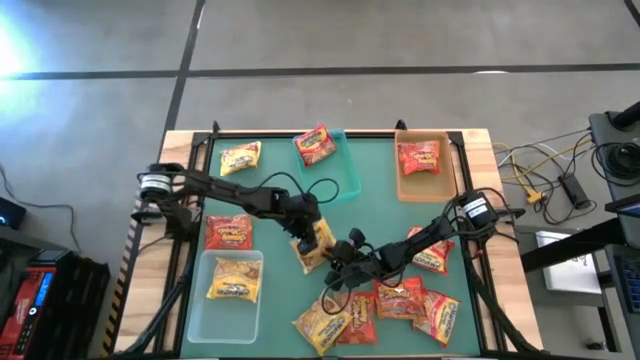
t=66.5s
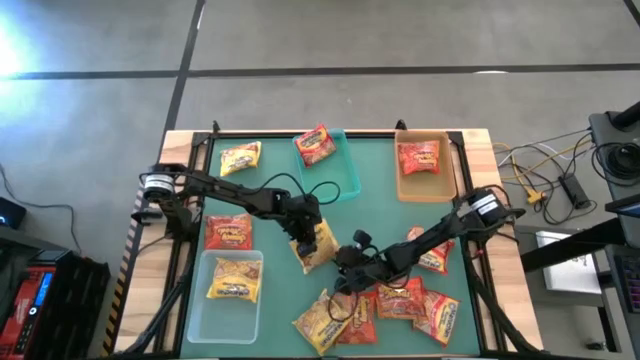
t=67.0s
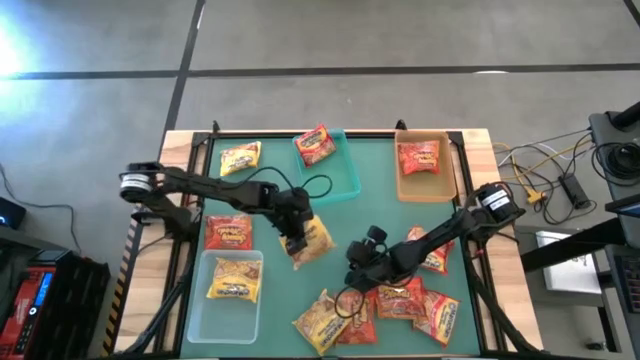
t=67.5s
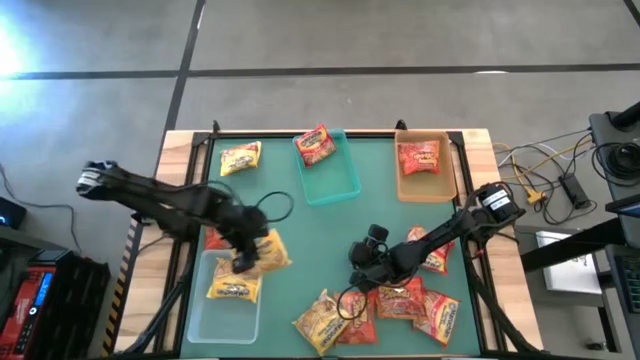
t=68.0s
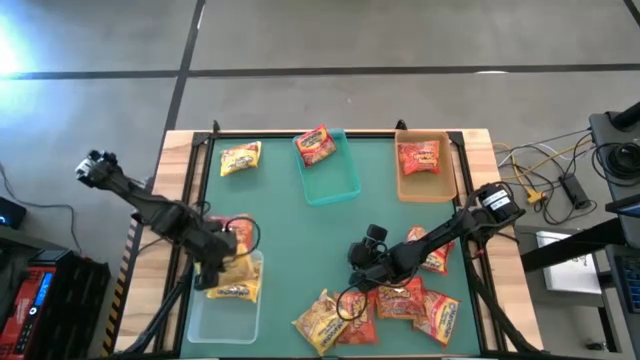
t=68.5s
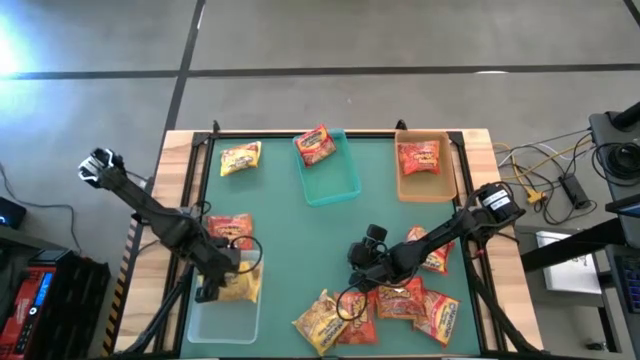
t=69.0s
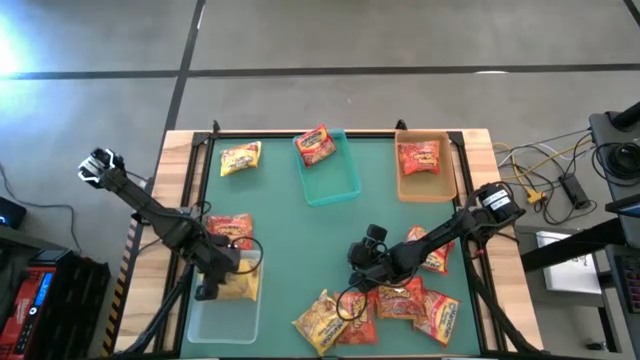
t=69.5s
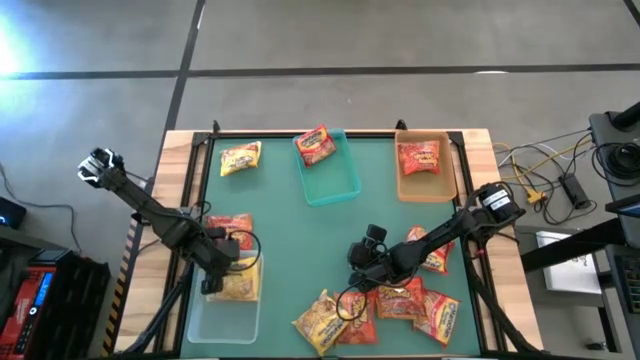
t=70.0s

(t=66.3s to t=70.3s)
Task: Sort Maruchan noodles
Put the middle left yellow noodle pack into the transparent bin

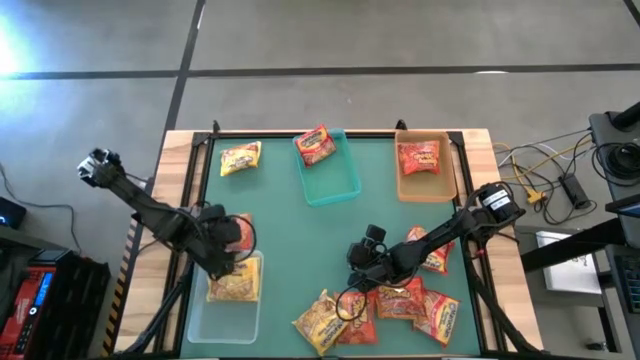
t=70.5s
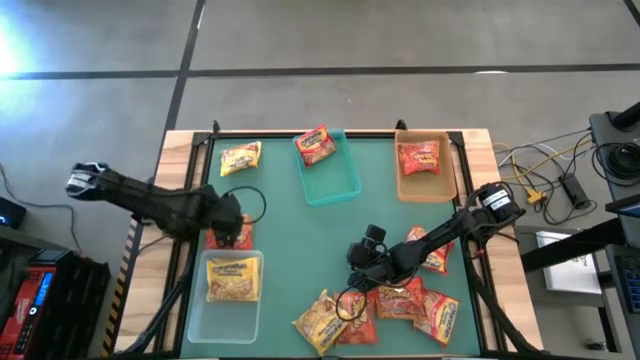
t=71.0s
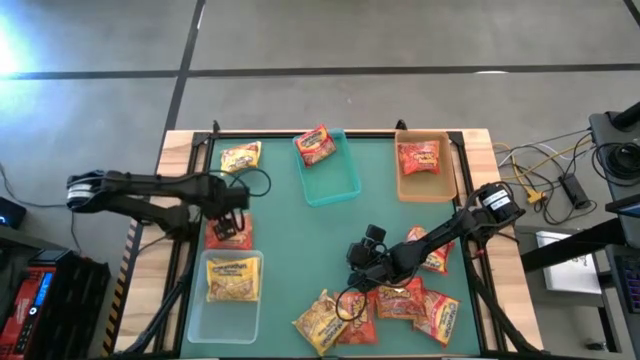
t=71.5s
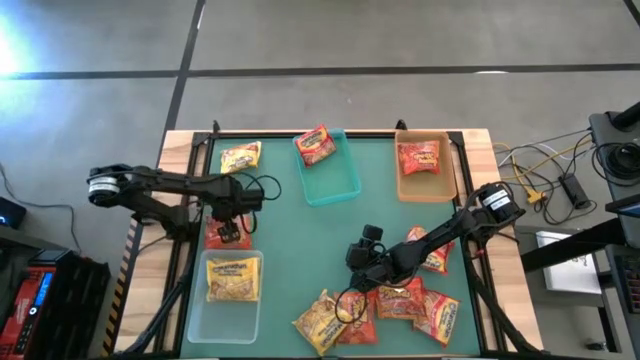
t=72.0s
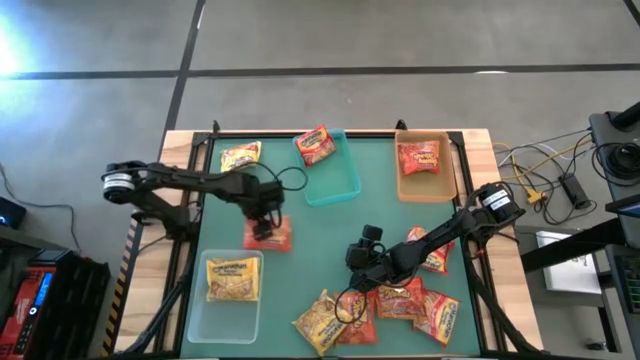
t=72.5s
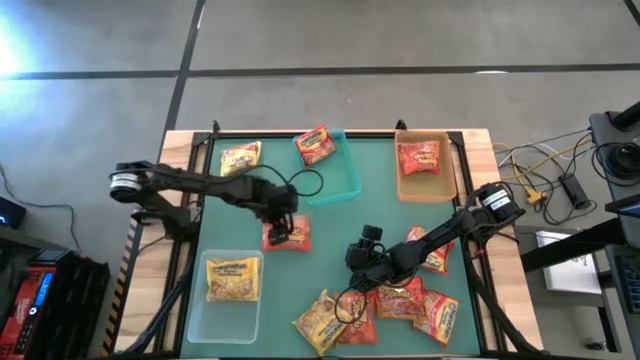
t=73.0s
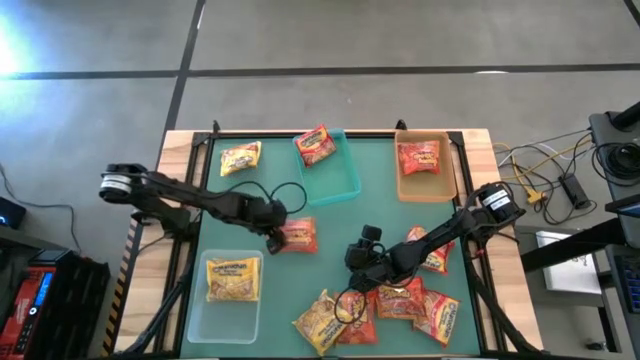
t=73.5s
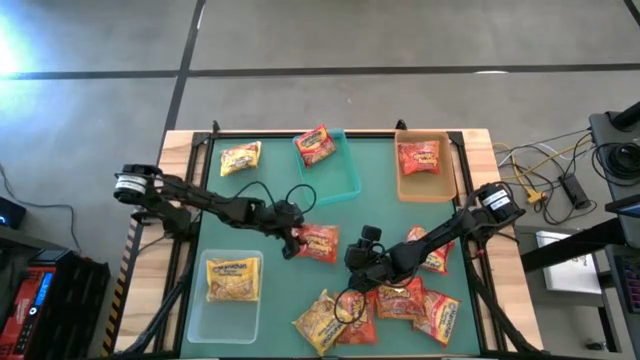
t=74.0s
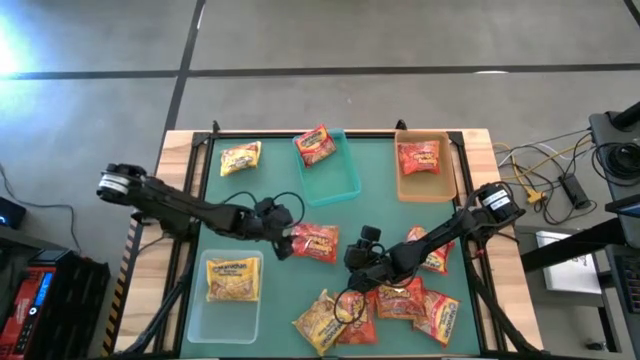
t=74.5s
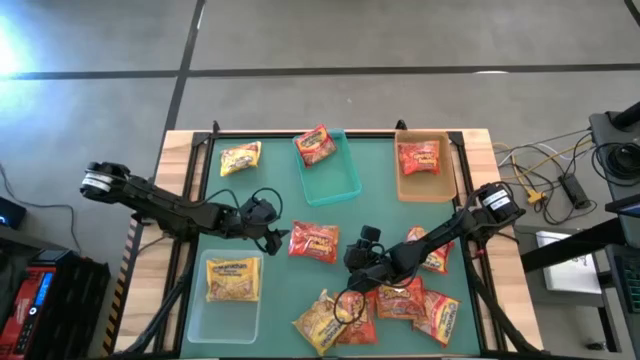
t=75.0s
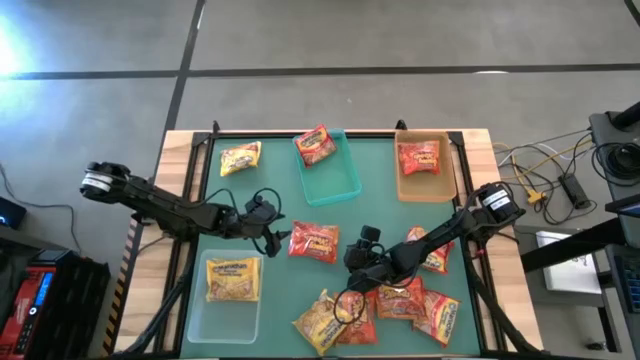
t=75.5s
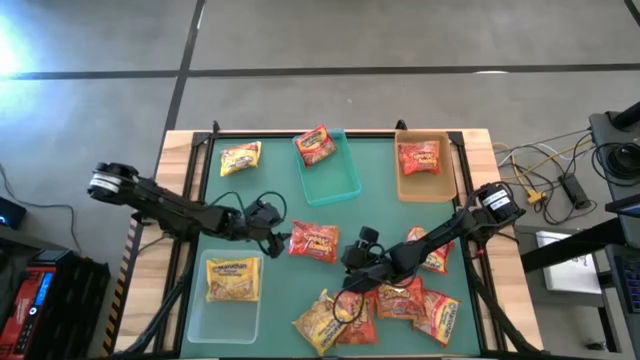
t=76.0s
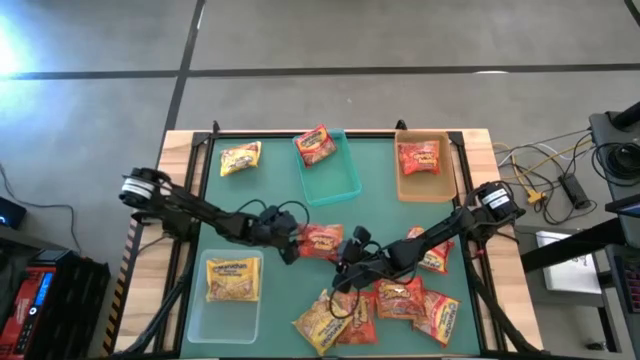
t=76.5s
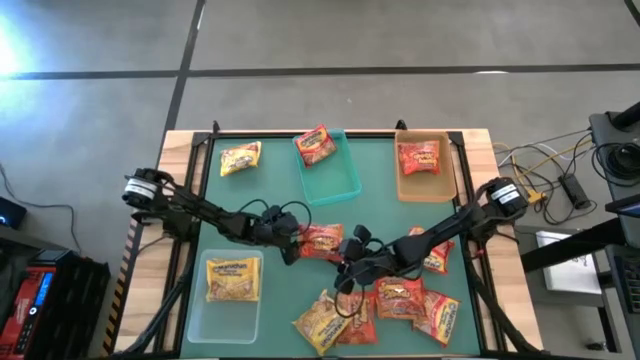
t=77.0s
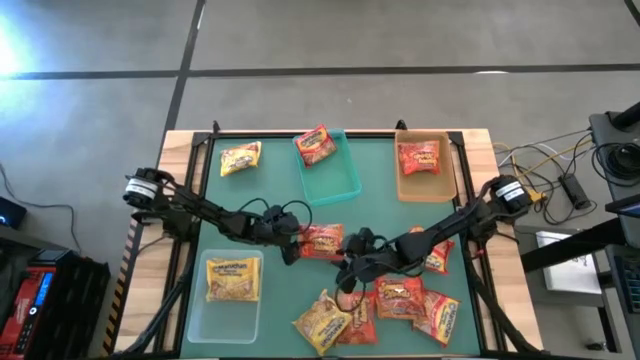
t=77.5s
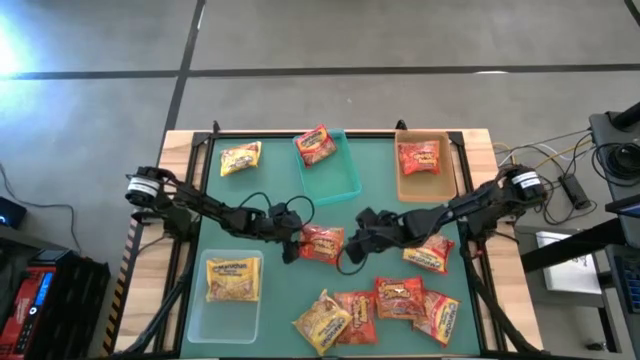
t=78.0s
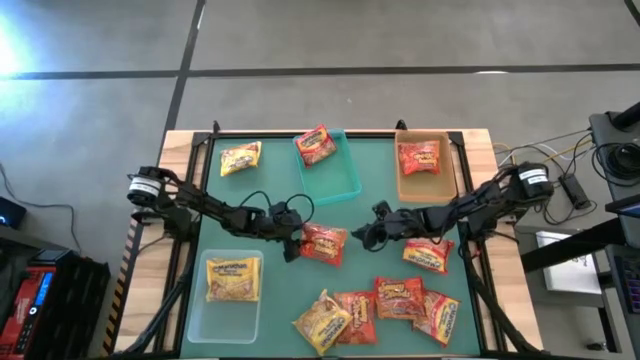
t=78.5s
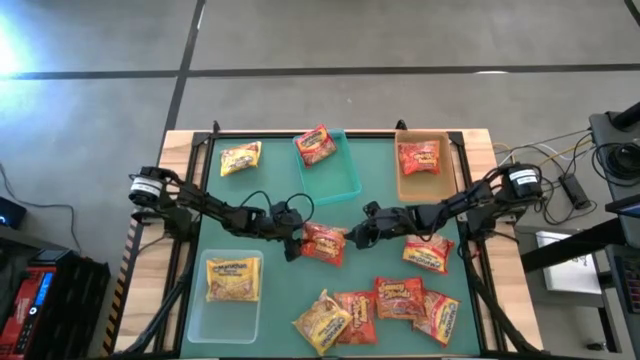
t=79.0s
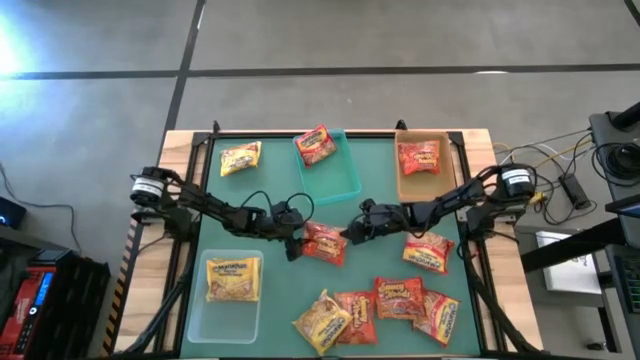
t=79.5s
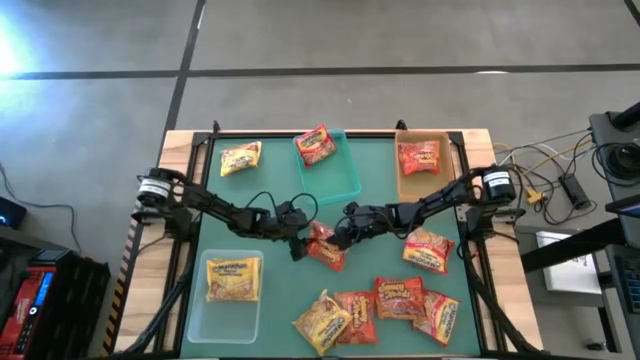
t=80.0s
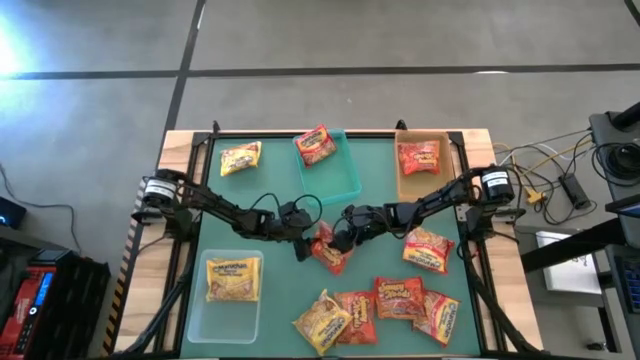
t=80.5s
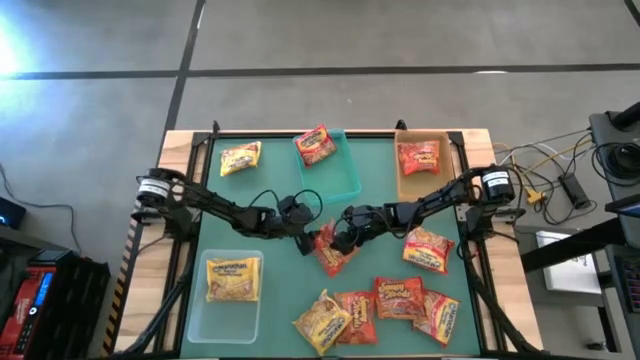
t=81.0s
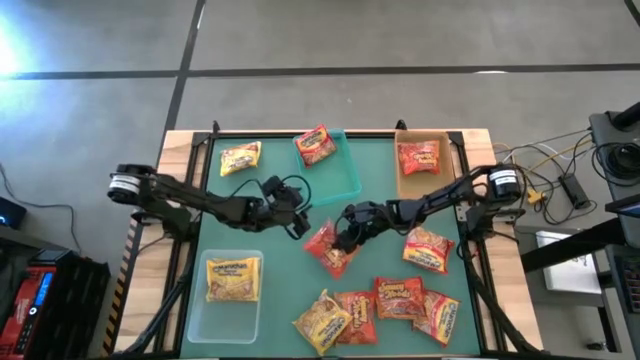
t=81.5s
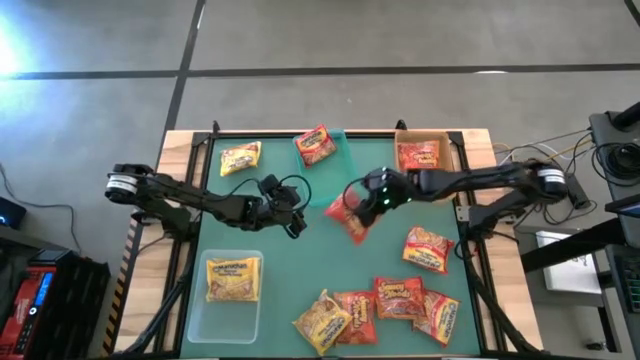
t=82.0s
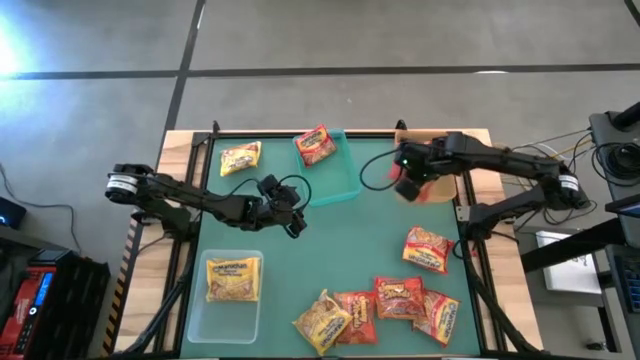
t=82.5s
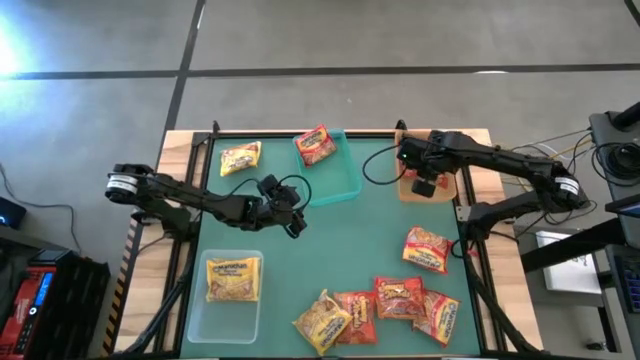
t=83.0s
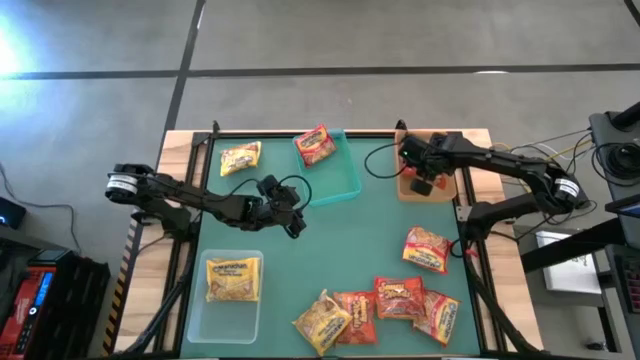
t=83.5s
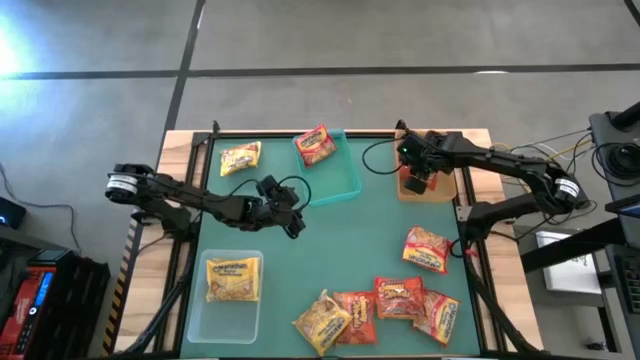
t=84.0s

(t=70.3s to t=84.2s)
Put the middle left orange noodle pack into the orange bin

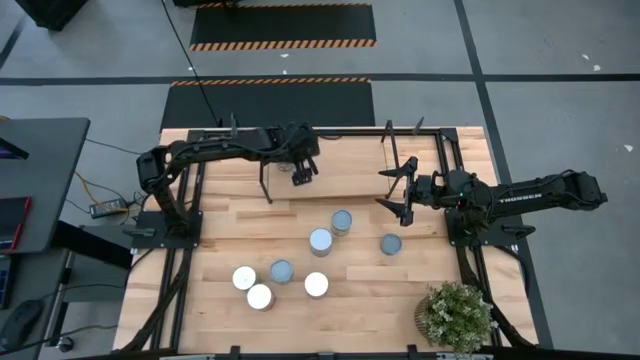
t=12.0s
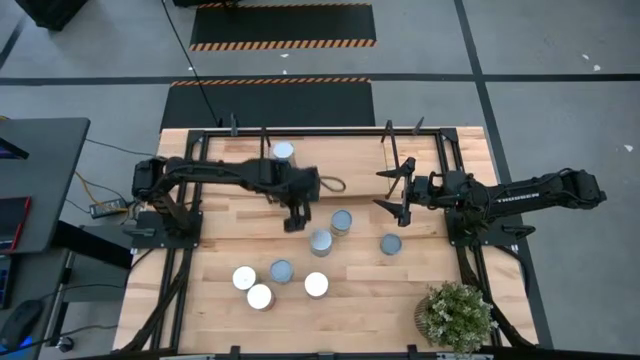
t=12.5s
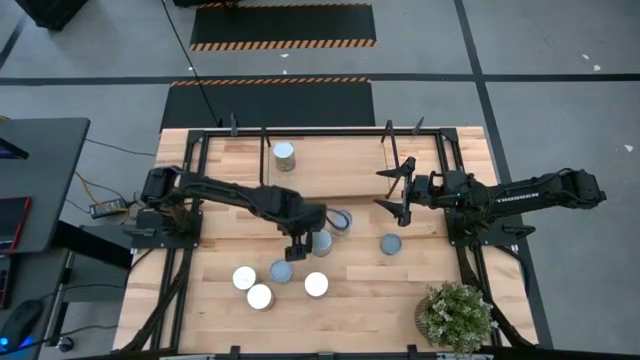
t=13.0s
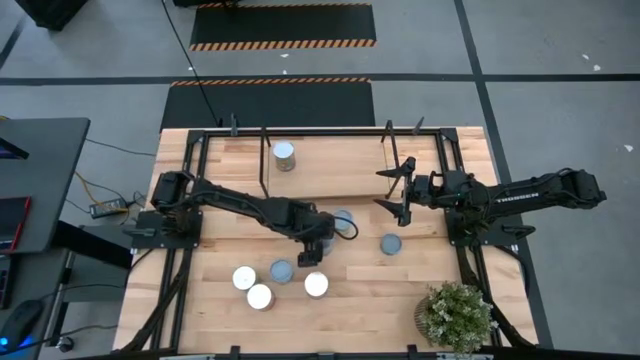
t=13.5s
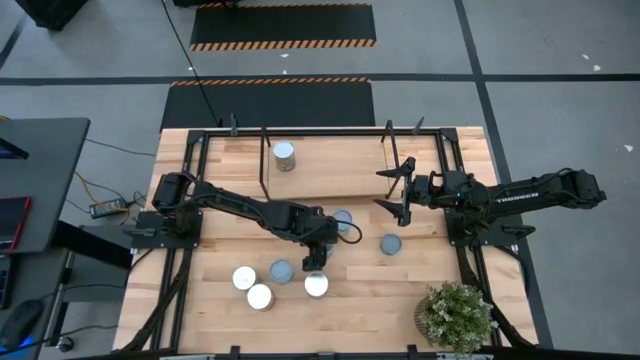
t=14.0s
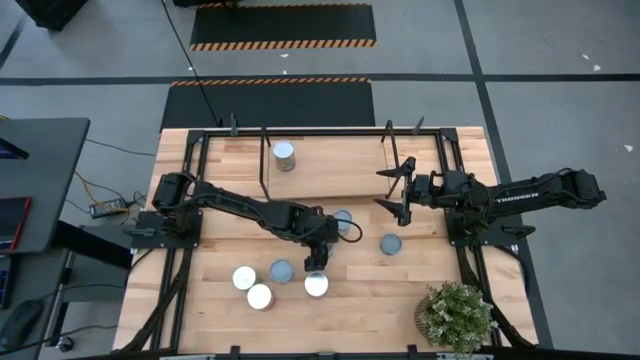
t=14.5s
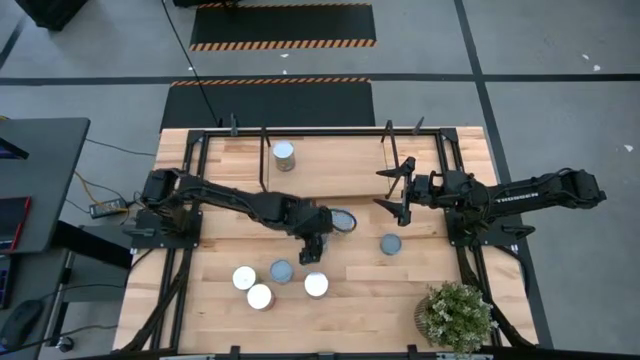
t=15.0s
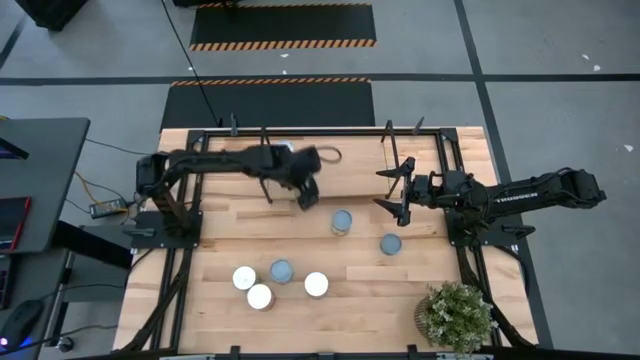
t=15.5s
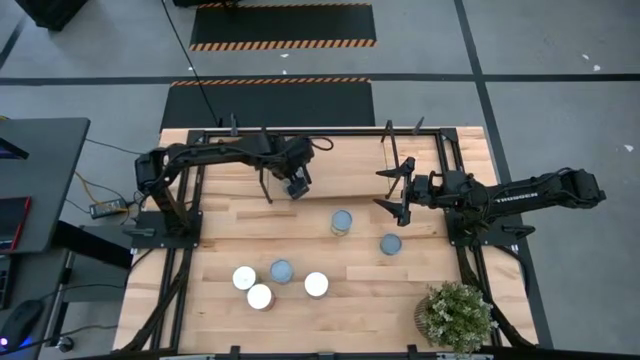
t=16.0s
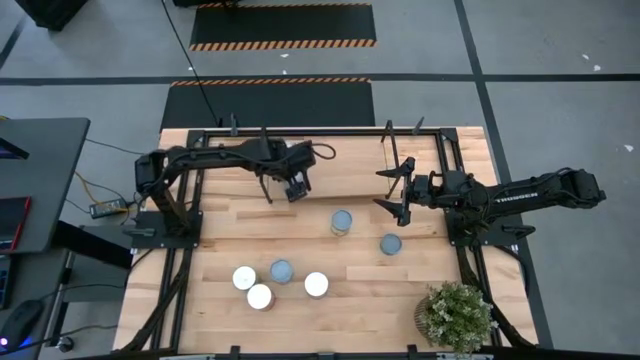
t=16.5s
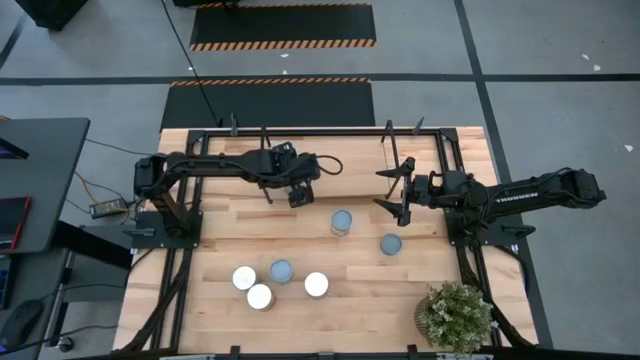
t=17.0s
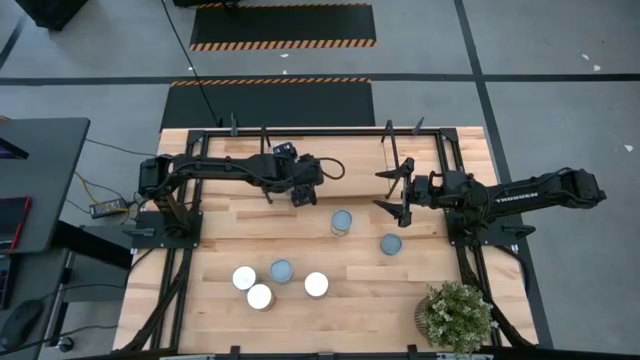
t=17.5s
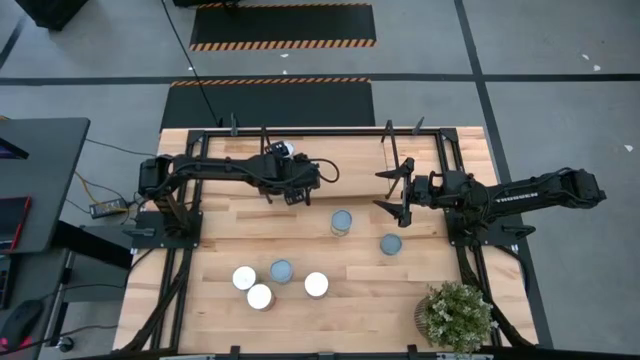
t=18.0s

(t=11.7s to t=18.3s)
Task: Pick and place cans onto a shelf
Put the canned cherries on the shelf
